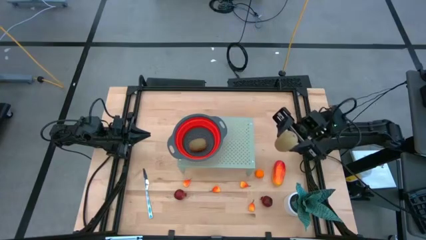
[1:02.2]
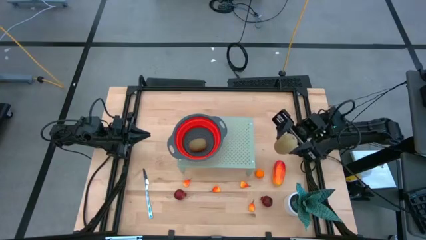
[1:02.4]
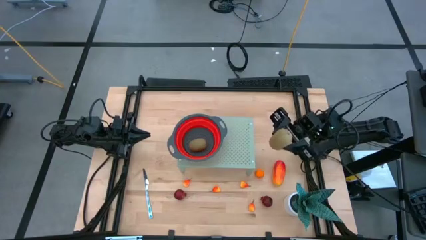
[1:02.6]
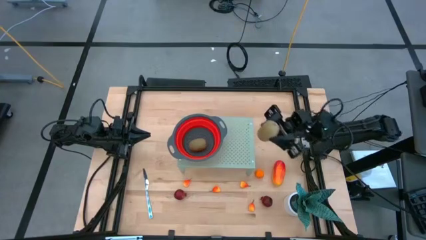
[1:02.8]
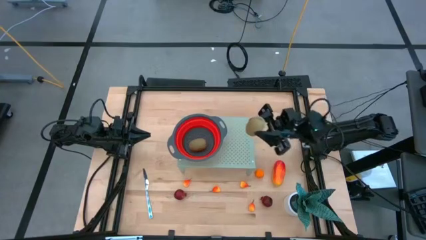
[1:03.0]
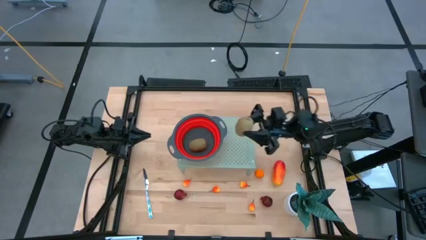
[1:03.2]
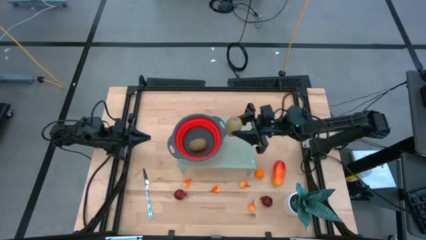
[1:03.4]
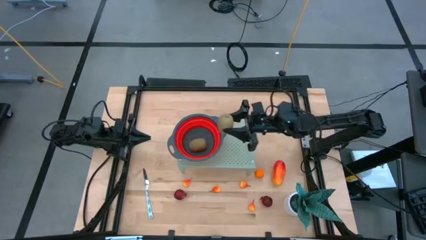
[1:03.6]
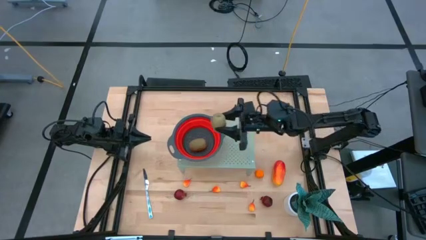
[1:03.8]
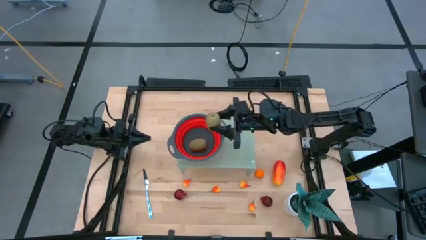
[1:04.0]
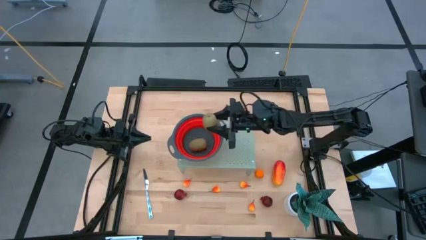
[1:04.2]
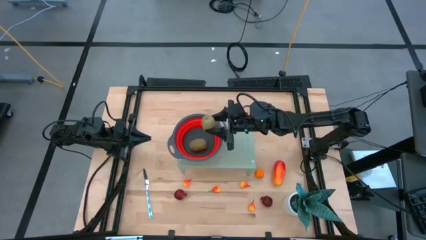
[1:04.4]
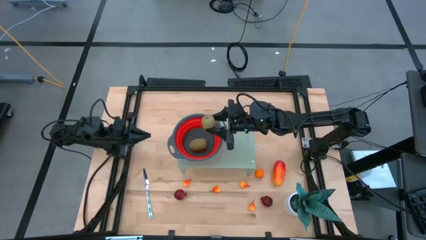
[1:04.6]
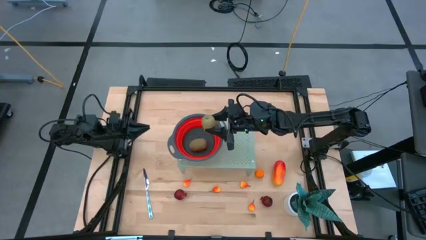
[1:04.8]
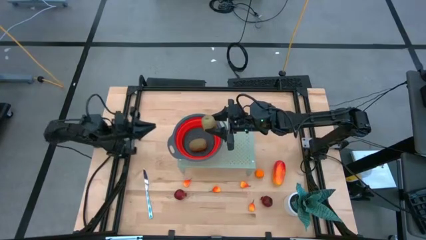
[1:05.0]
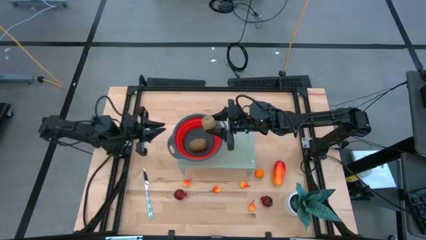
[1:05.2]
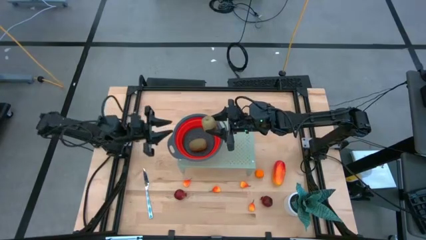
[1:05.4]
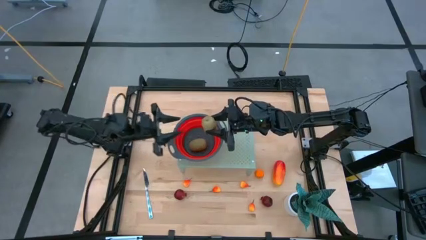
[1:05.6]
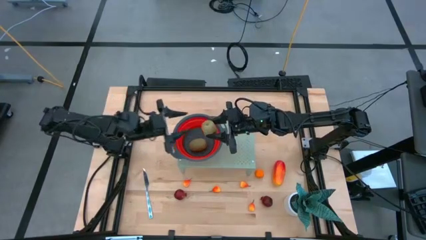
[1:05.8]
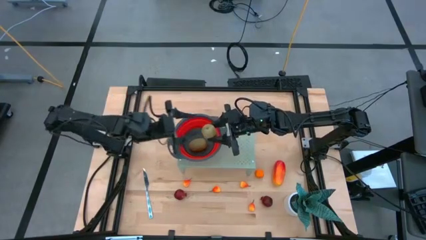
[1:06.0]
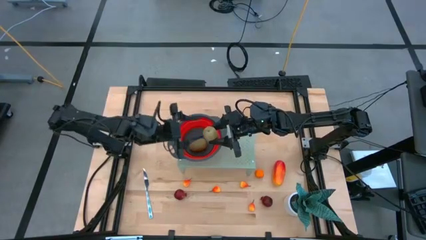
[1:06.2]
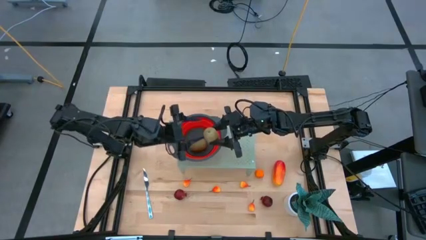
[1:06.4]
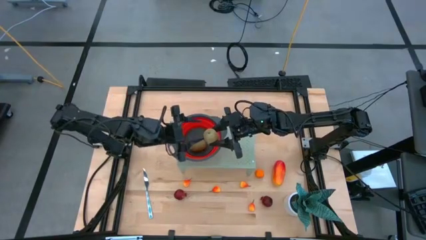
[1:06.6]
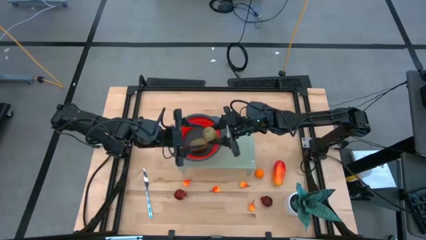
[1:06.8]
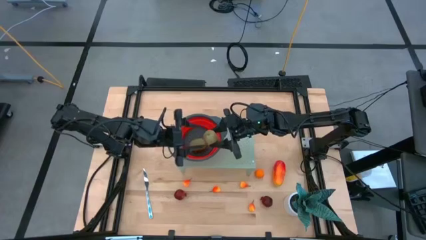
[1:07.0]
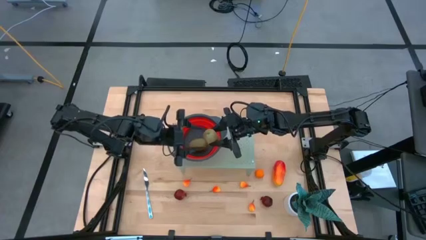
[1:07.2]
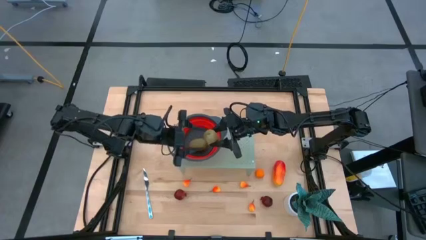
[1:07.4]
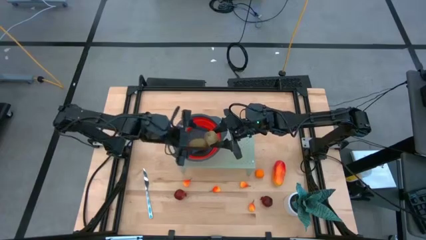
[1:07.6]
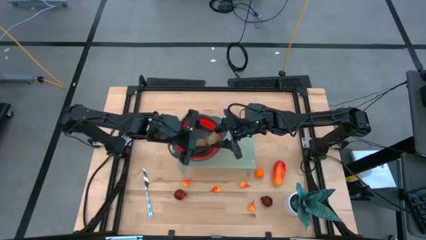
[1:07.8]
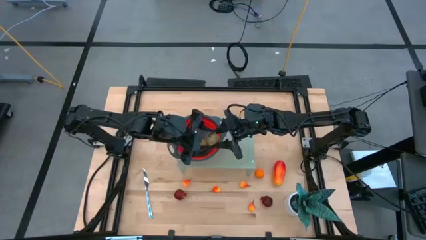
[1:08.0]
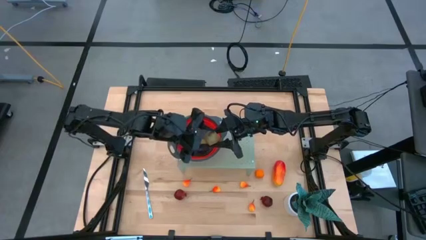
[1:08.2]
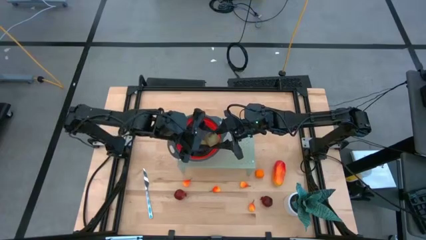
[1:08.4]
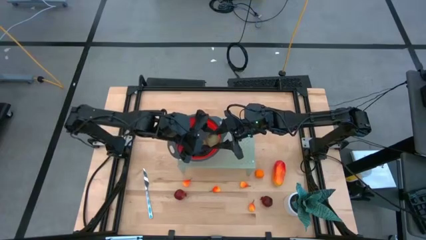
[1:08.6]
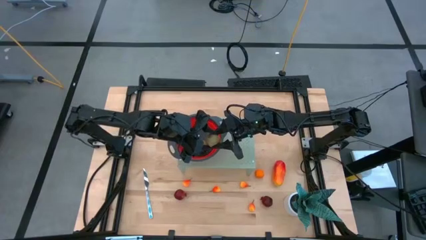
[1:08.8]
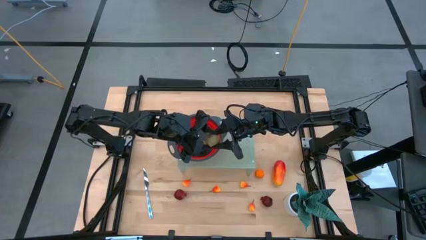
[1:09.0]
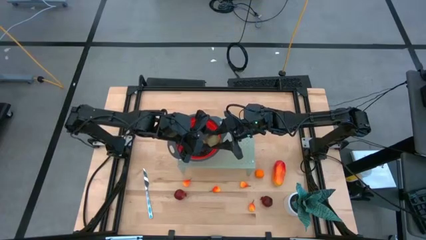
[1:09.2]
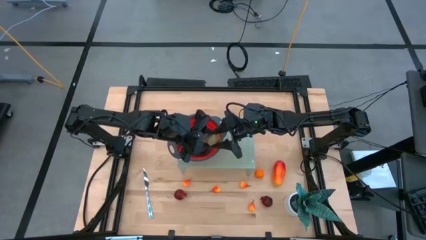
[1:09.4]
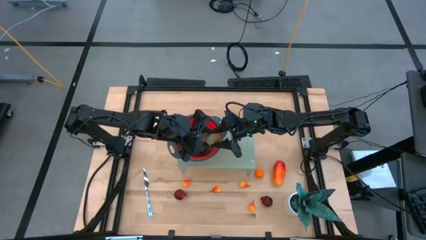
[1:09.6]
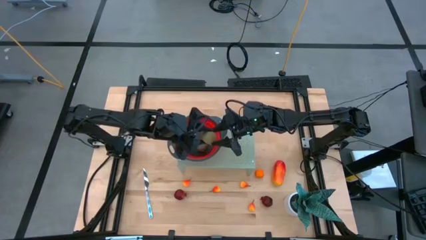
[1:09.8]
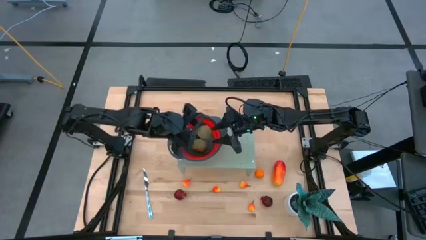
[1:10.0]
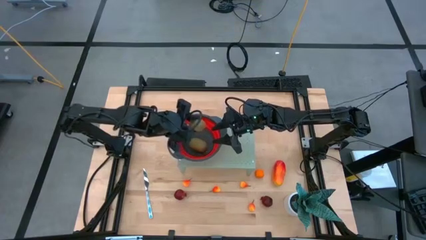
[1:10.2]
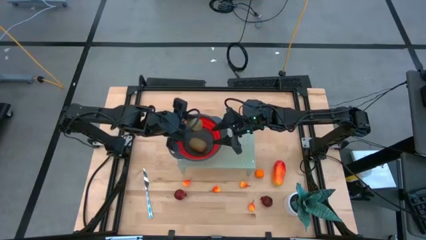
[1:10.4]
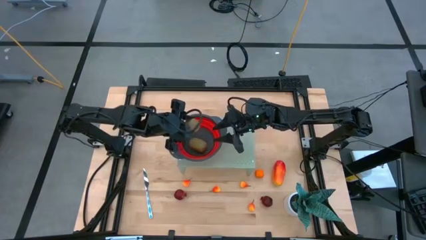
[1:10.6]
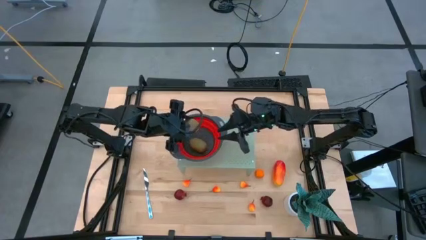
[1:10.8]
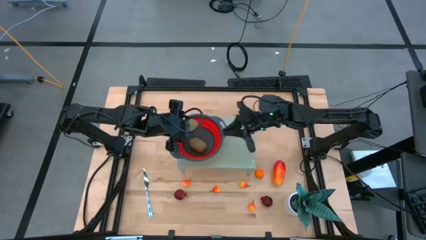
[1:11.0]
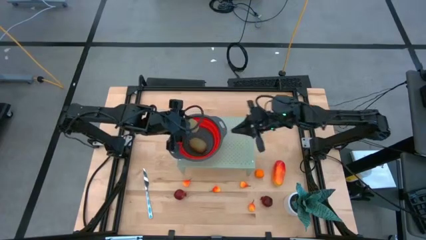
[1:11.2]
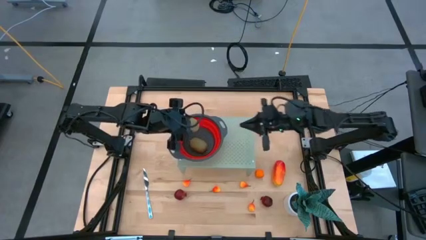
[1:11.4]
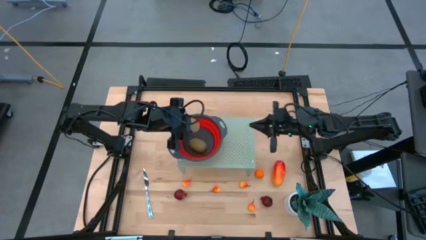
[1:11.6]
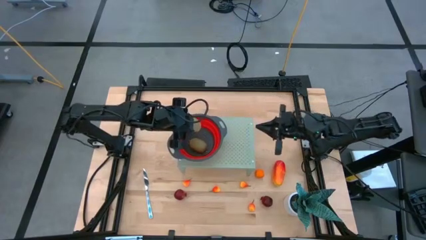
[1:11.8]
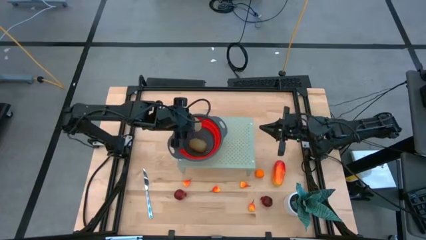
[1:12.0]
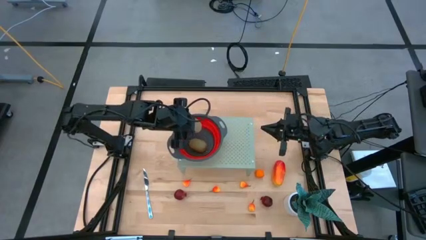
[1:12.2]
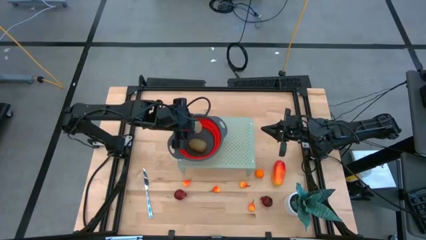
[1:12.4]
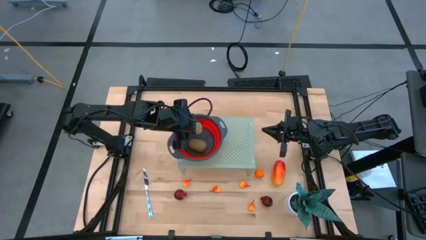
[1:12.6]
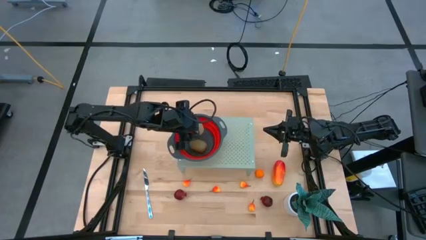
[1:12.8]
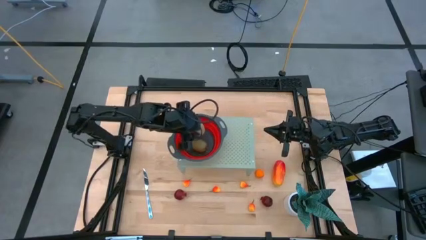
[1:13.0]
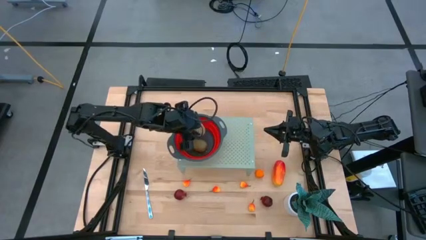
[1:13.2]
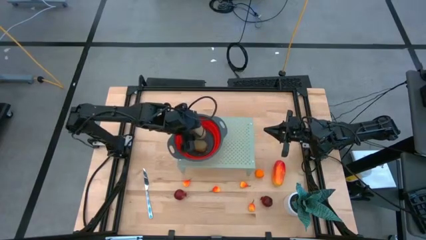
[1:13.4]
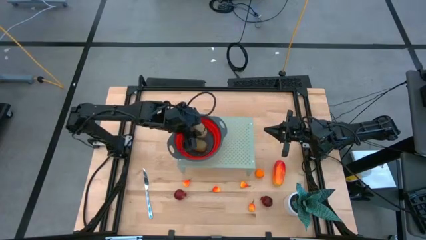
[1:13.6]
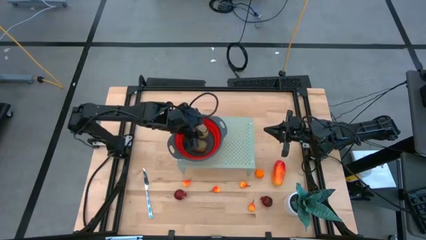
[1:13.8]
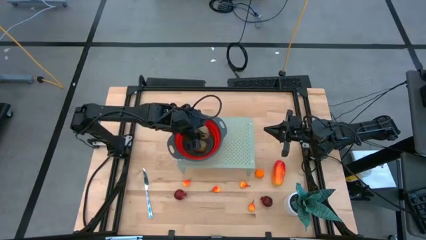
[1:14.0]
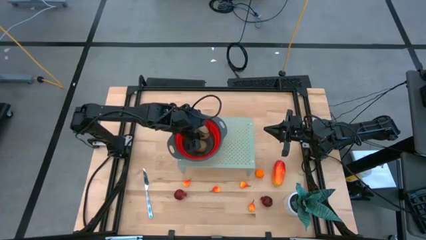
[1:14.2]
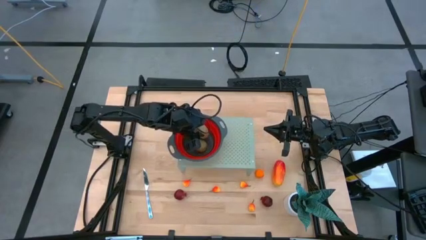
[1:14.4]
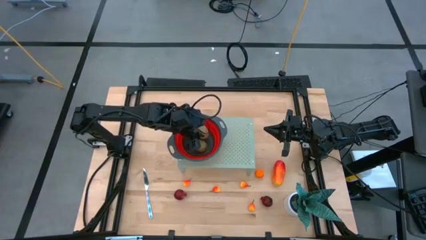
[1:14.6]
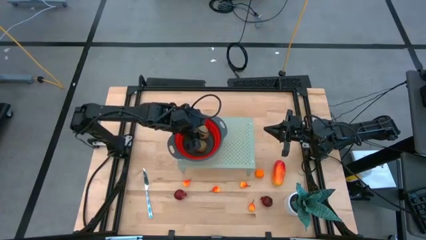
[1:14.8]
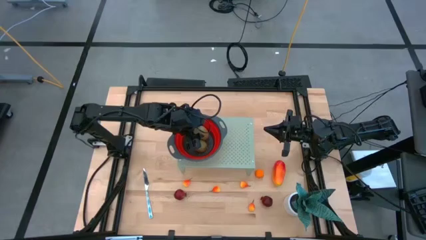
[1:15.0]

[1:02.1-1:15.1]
Task: Pick & Place Fruit
Put the kiwi fruit into the strainer
